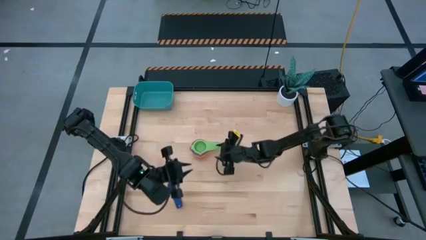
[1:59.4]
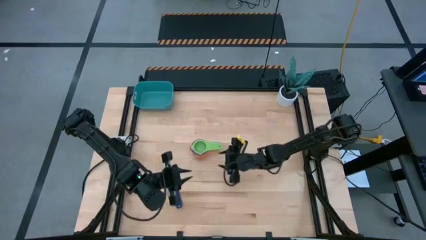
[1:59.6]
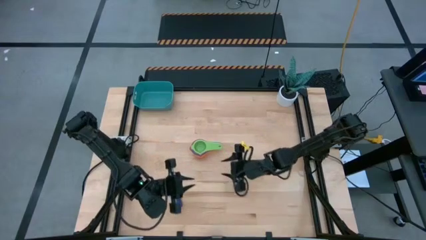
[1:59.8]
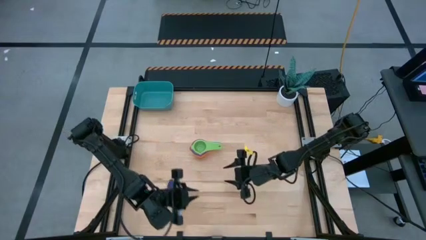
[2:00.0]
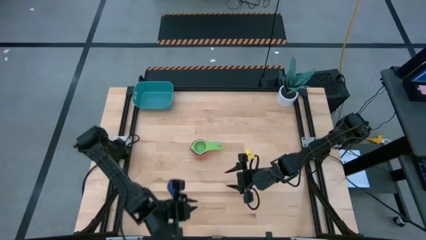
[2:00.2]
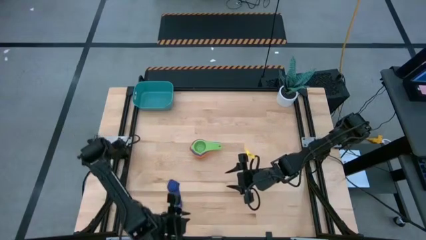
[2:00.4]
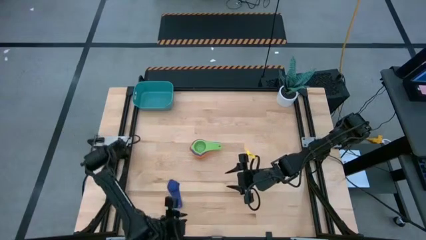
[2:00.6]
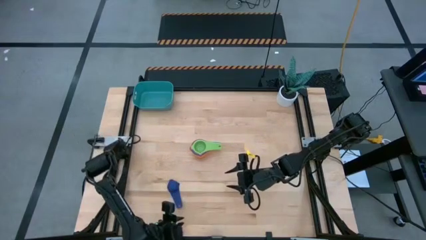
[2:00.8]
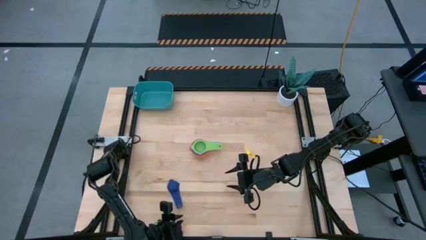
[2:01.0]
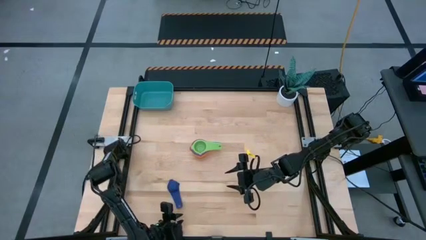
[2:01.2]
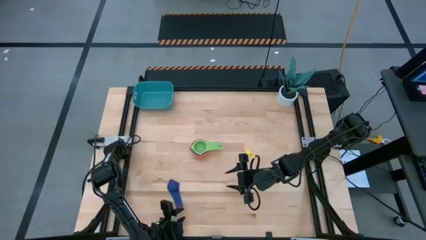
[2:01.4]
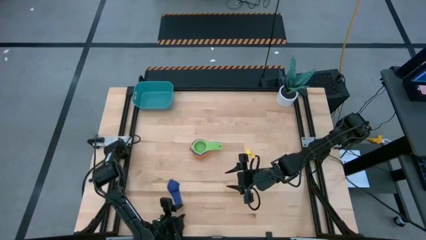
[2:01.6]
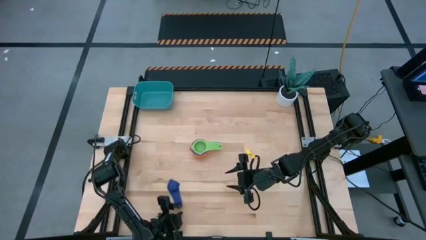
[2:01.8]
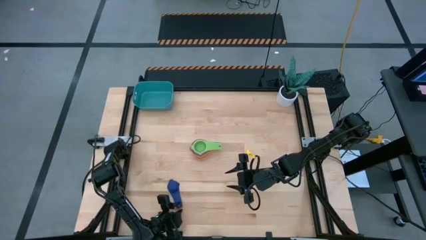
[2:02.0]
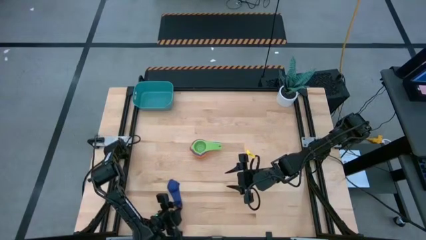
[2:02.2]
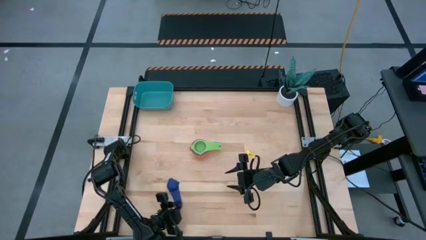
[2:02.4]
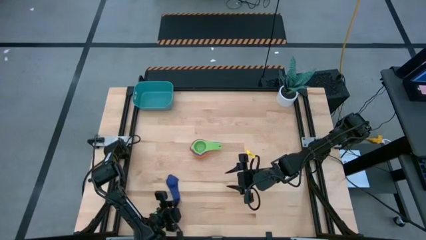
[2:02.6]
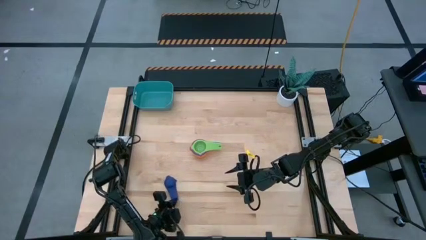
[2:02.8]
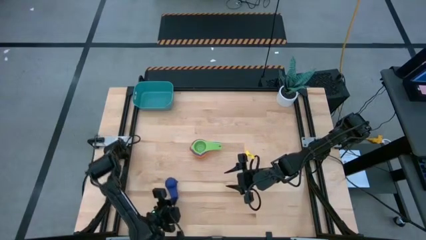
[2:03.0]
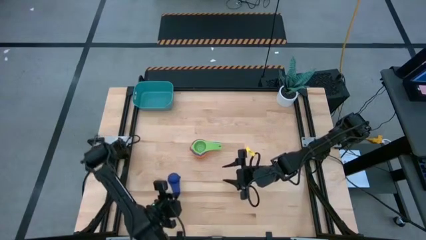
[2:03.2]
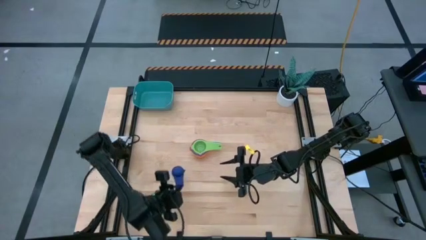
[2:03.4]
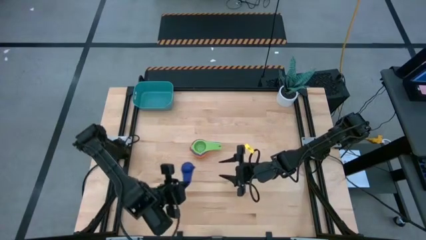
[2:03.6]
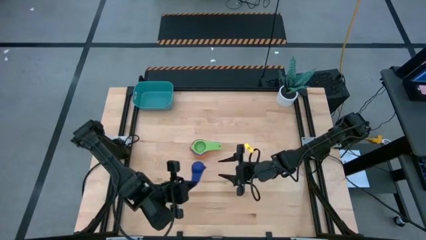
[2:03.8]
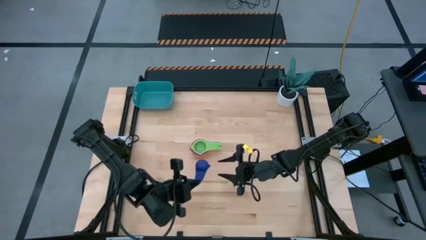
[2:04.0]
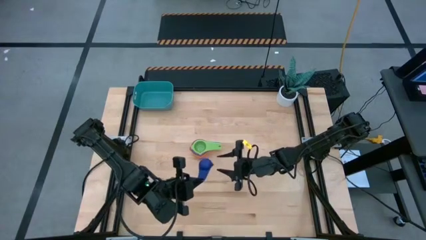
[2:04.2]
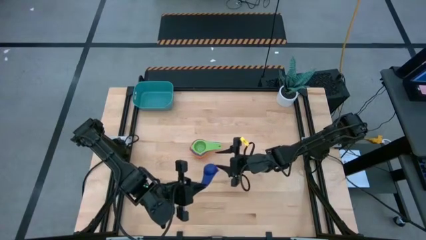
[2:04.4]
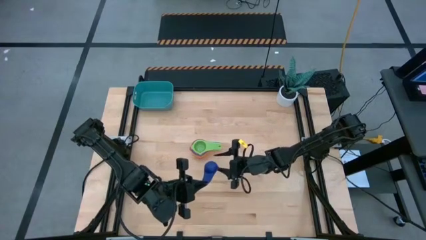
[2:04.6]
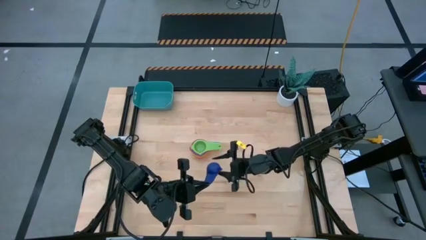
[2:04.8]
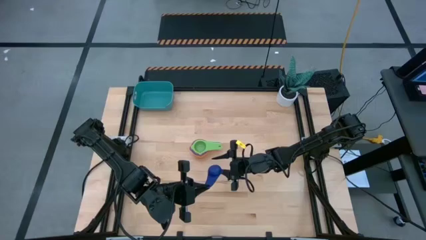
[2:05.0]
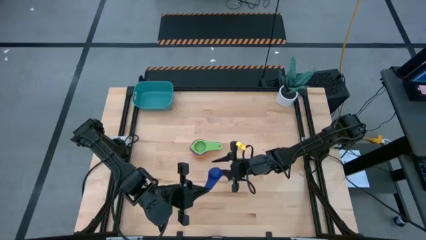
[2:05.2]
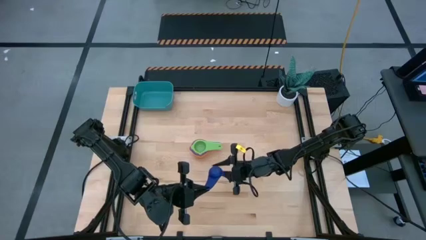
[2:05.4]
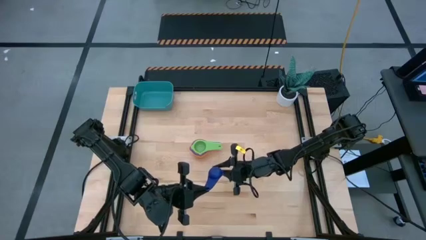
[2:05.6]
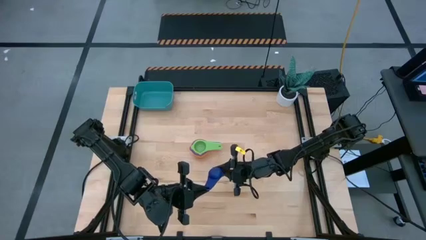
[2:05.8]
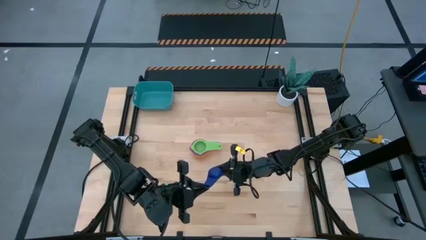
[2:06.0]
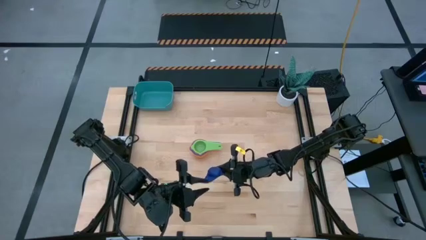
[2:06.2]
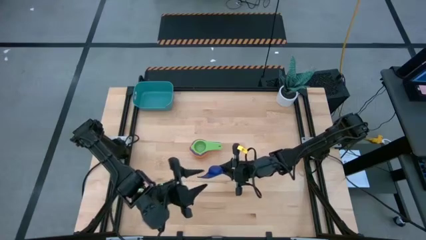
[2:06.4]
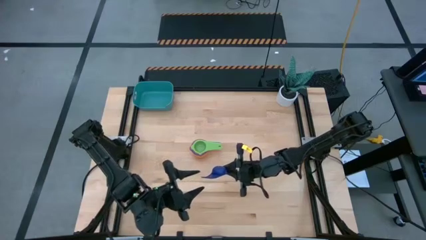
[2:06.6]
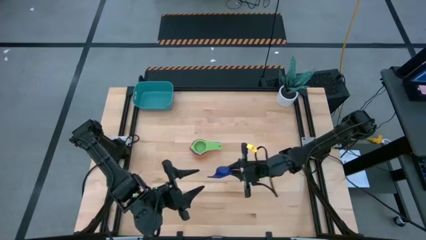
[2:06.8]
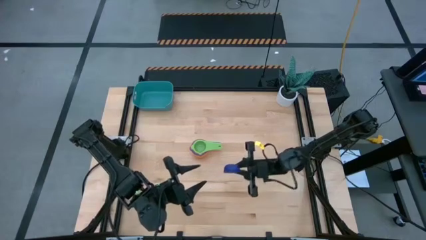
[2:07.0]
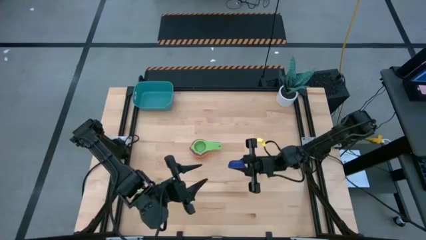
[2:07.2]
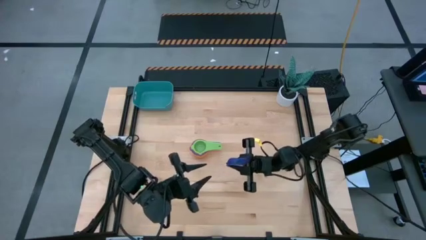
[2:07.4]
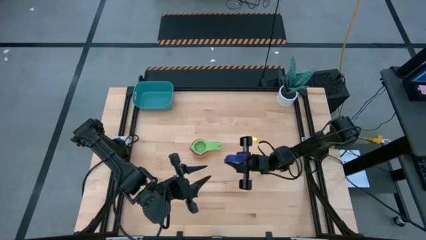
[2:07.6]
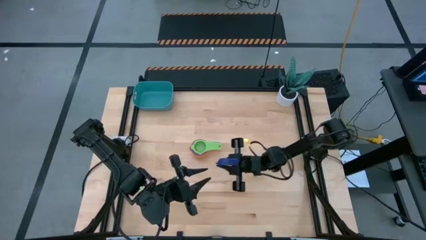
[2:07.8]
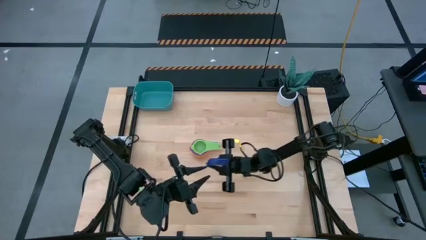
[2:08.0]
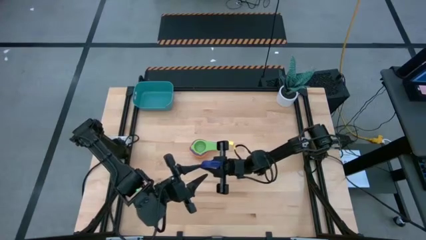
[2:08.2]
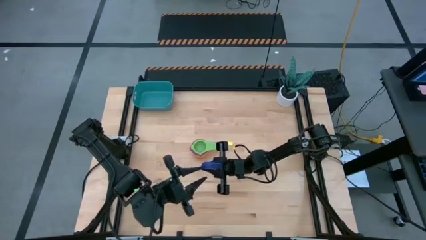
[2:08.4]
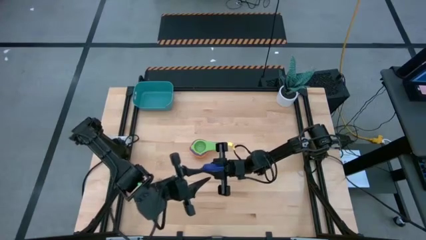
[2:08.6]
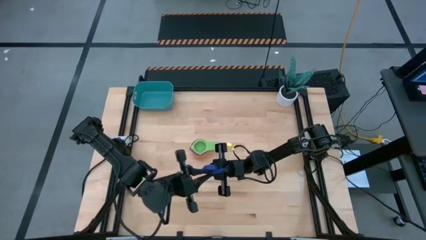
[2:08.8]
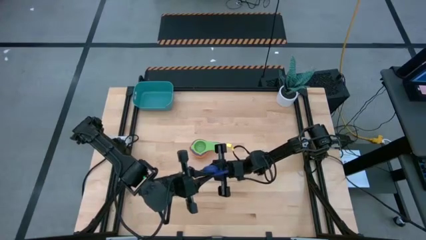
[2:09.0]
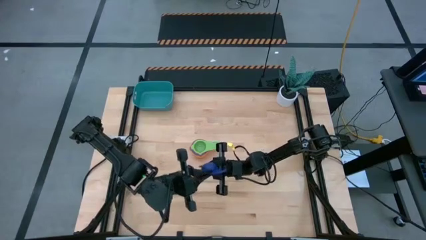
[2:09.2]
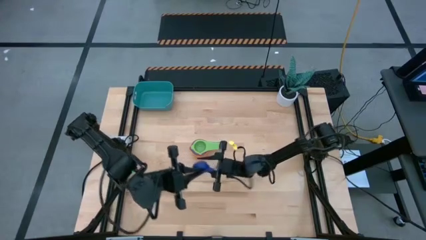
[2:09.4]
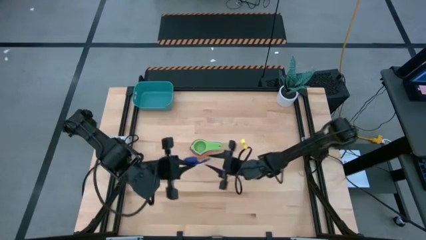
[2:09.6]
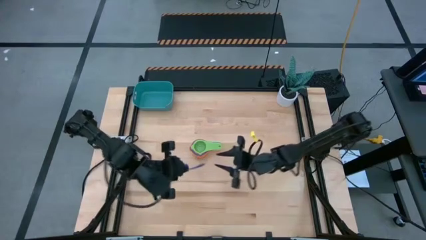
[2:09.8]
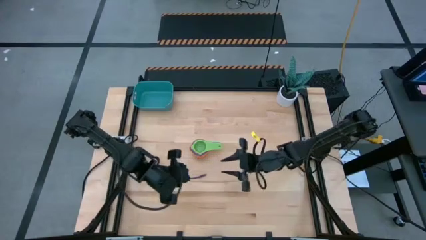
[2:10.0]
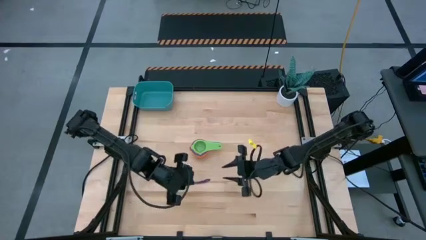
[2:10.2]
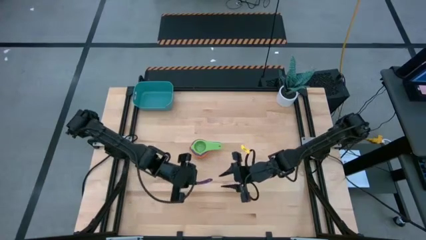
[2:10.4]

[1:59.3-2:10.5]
Task: Nest measuring cups in basket
Stack the dark blue measuring cup on top of the green measuring cup

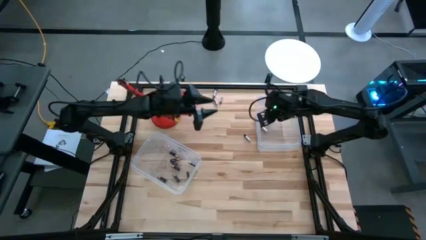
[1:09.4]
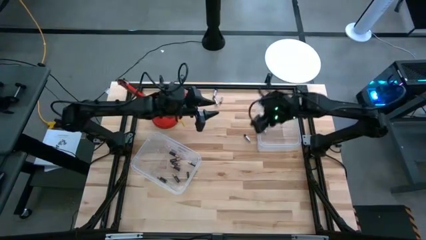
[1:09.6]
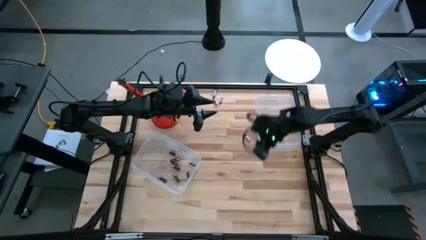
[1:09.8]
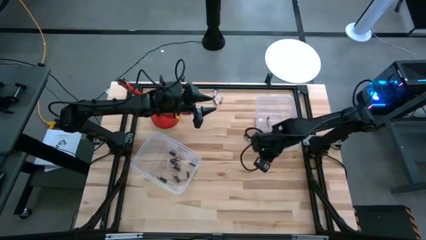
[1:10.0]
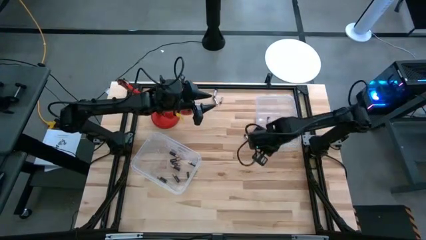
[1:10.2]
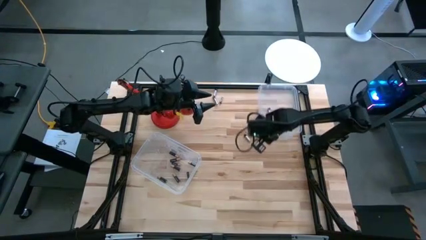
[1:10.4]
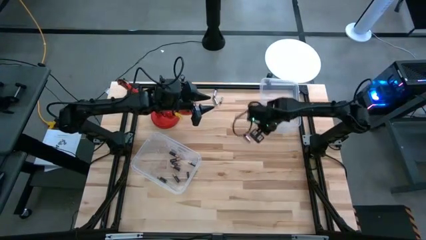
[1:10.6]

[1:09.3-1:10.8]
Task: Sort batteries
Move the top transparent bin to the top right of the table

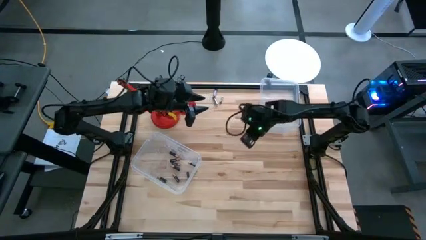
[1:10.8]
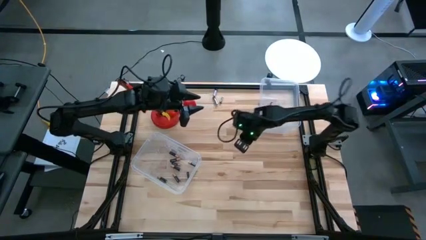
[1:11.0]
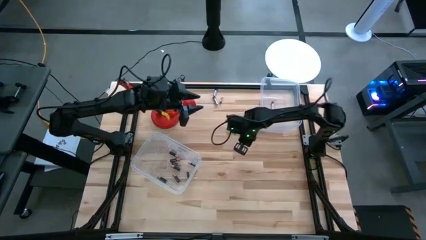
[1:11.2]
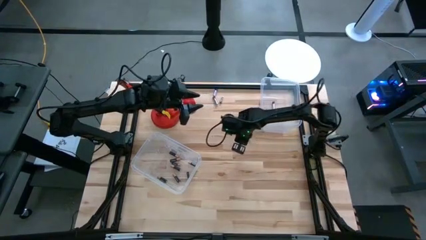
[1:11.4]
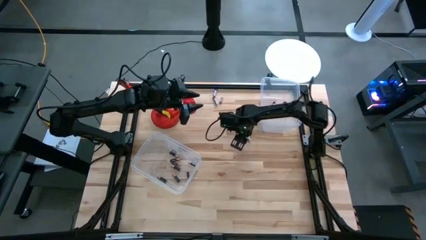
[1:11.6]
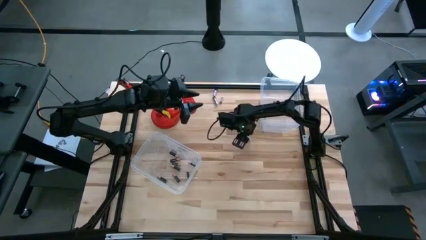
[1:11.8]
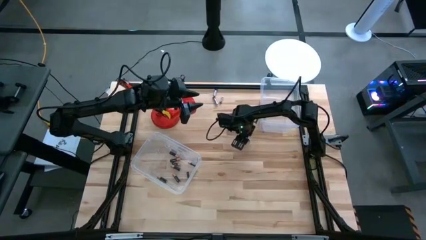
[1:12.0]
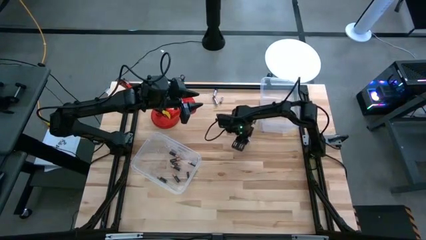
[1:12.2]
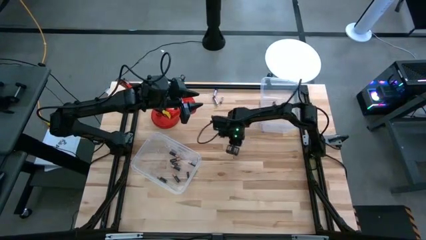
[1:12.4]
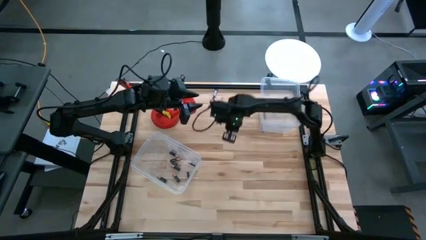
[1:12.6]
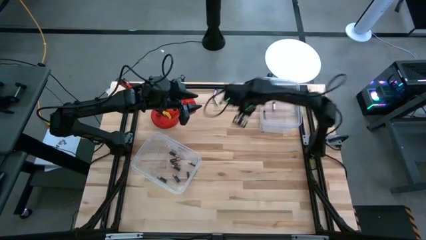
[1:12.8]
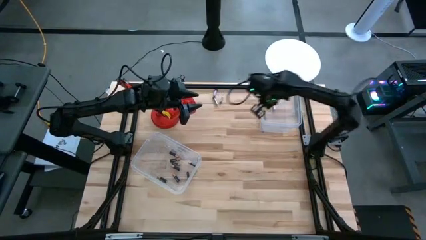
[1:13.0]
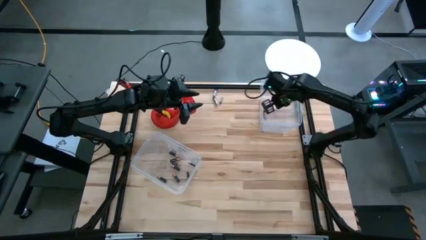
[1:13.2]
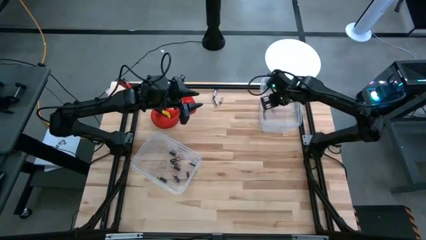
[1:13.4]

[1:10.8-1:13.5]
Put the silver battery into the top transparent bin

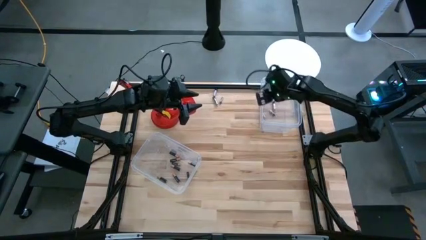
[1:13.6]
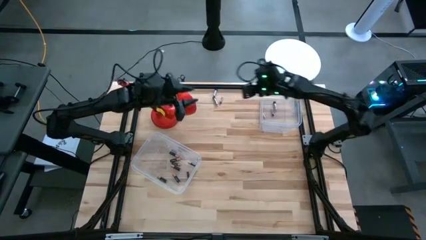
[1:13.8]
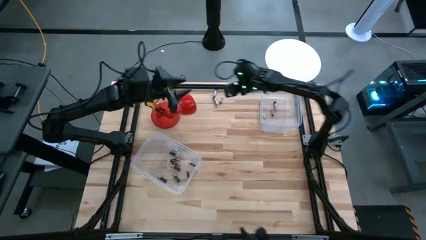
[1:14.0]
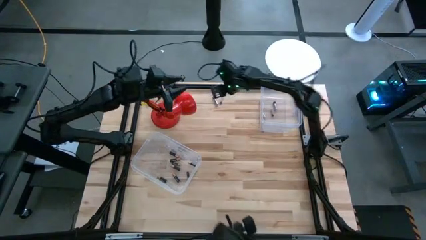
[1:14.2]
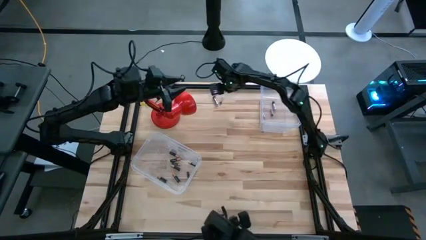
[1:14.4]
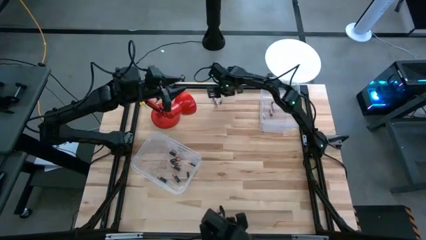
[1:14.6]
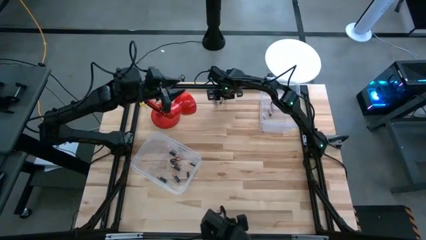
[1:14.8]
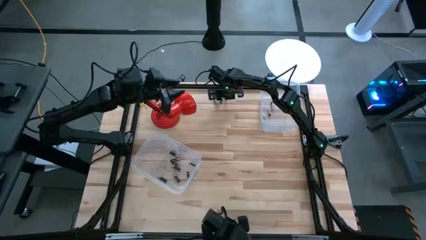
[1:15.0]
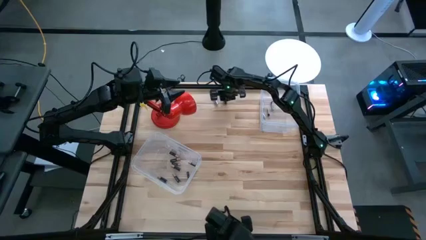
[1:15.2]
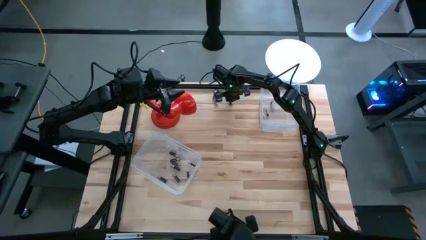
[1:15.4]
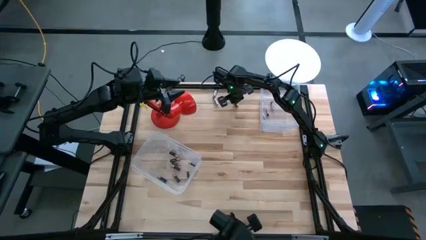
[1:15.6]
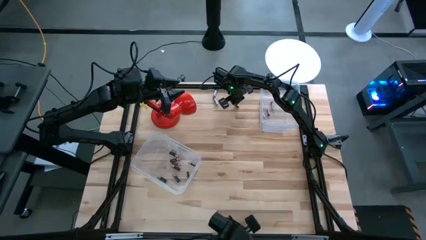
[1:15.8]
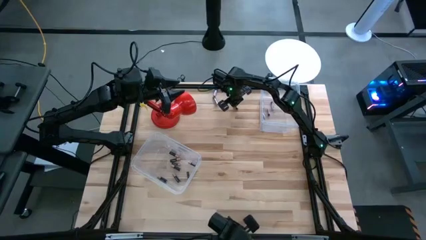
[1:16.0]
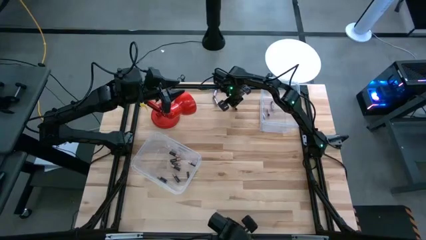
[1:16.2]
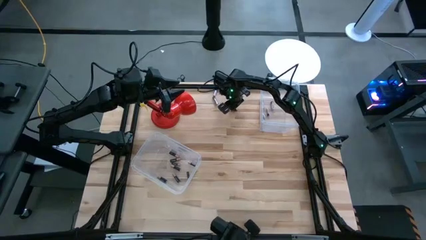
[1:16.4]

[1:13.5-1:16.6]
Put the silver battery into the top transparent bin
